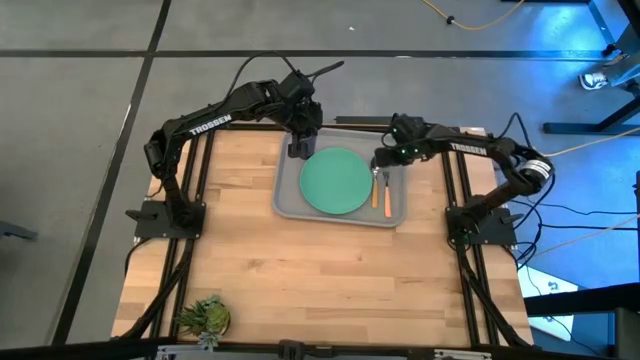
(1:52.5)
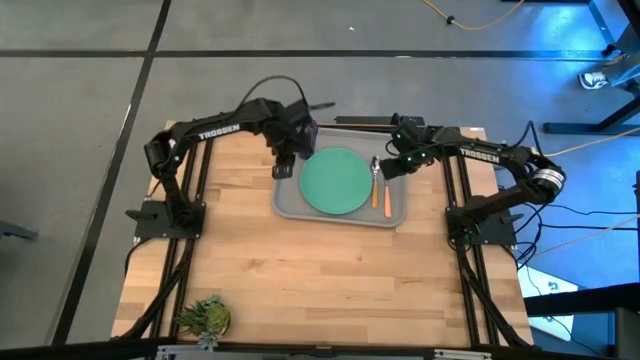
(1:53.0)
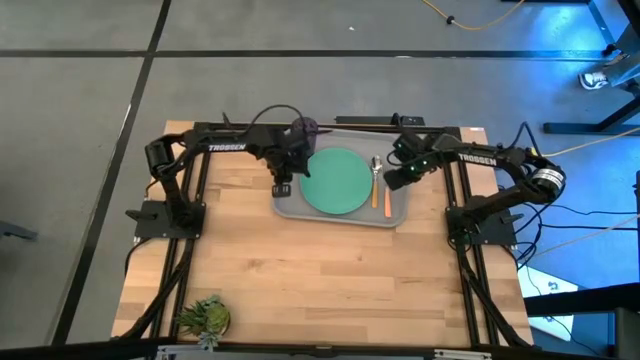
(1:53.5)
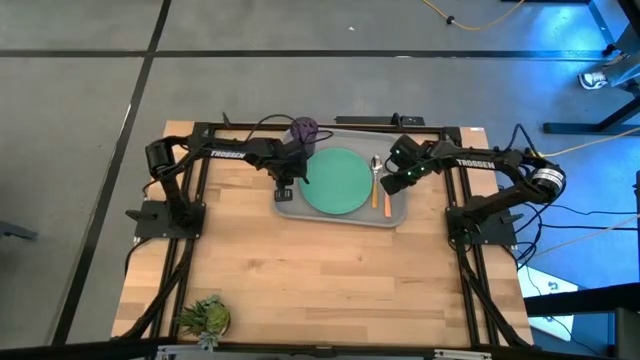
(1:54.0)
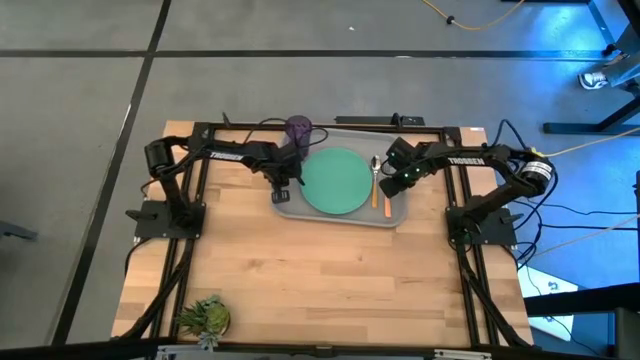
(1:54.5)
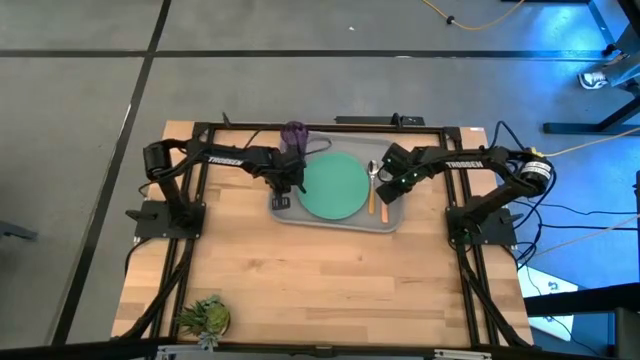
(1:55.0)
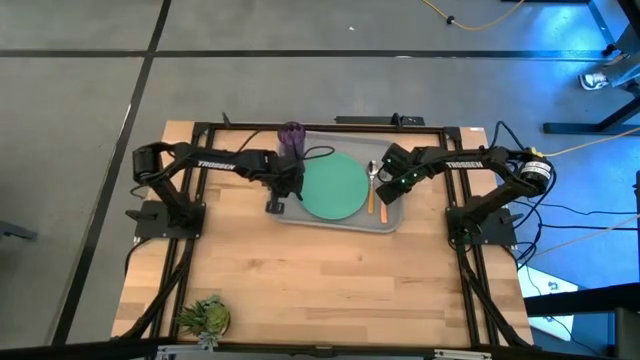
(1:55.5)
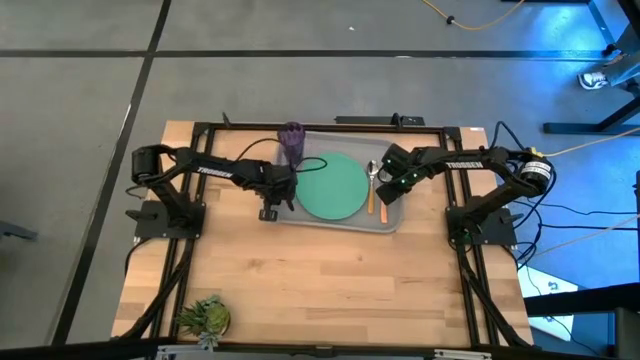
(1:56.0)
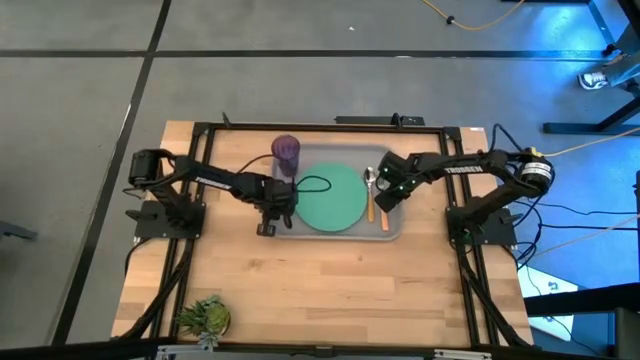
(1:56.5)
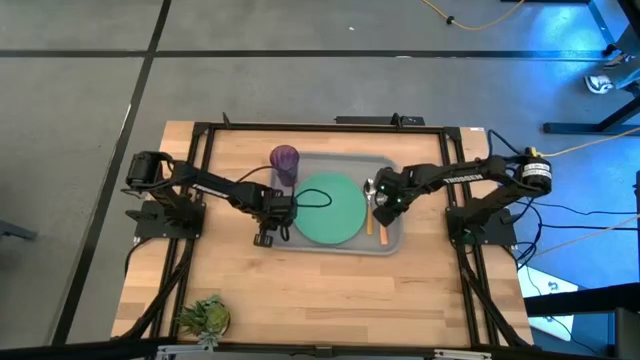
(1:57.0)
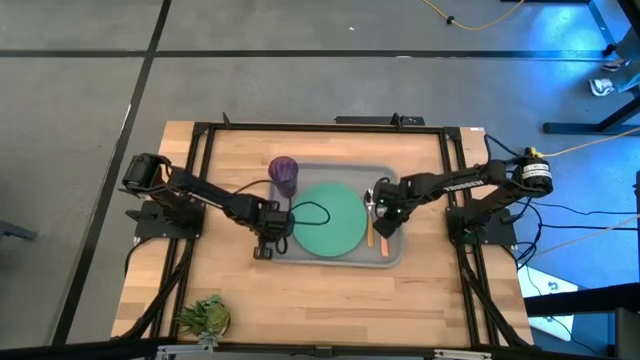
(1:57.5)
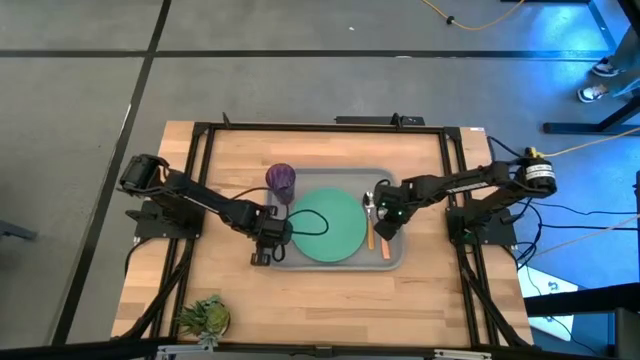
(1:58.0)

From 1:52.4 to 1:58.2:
Task: Pick and place plate/cup/fork/spoon on tray
Move the gray tray to the center of the table

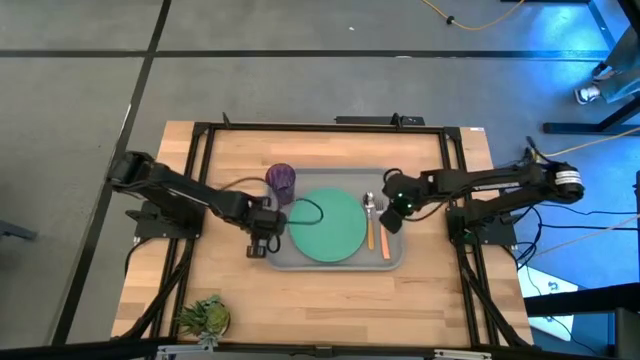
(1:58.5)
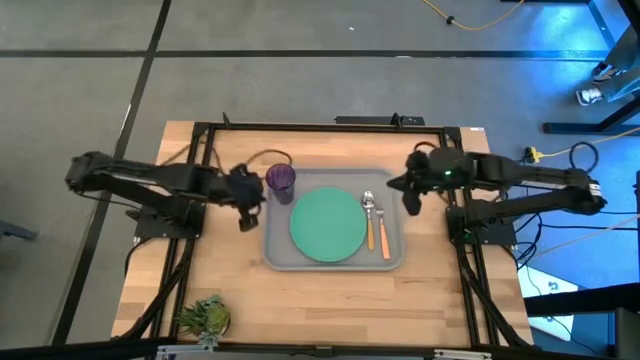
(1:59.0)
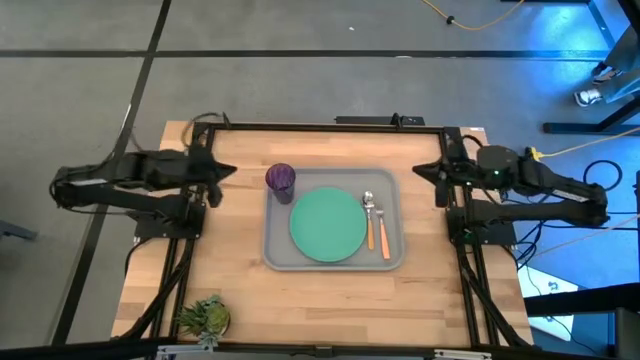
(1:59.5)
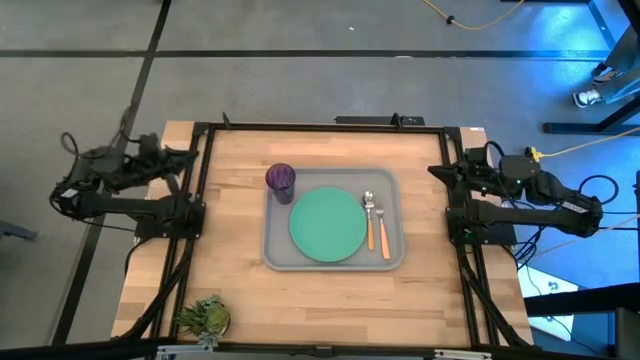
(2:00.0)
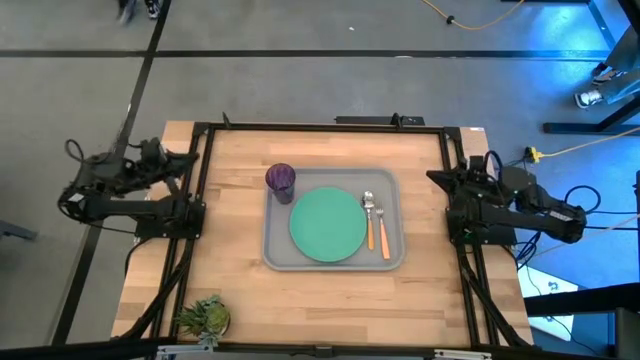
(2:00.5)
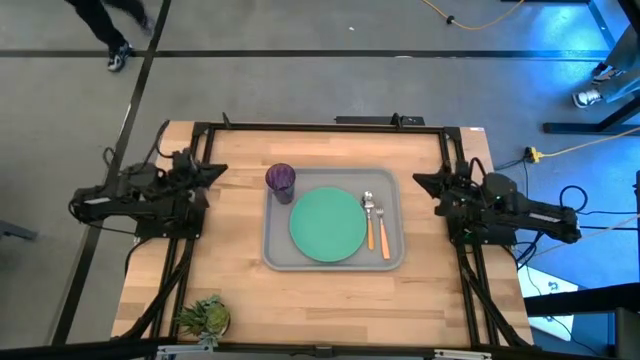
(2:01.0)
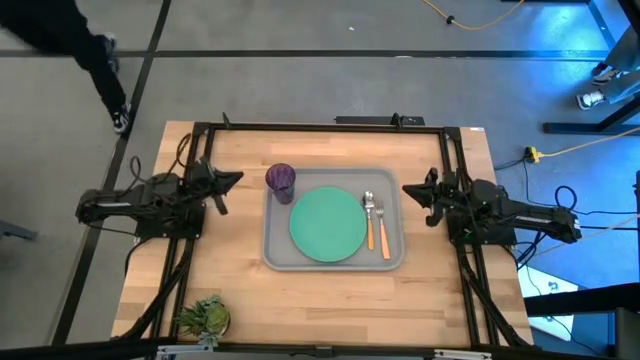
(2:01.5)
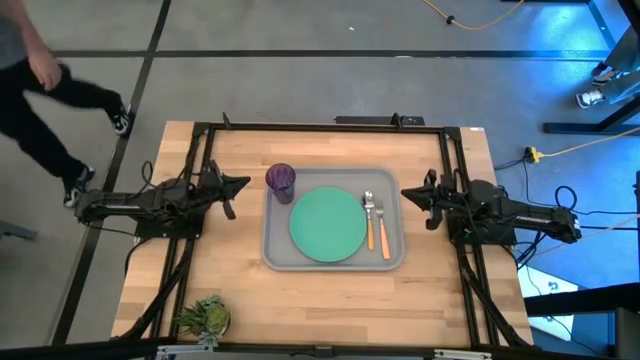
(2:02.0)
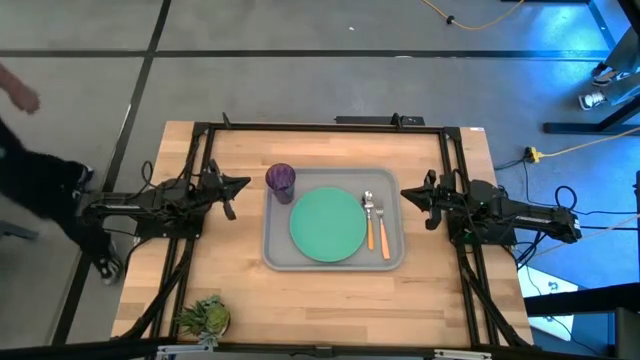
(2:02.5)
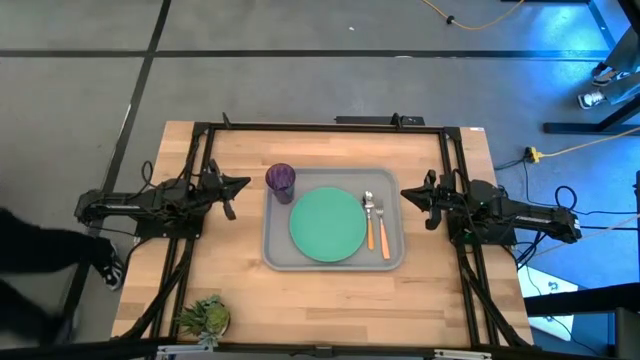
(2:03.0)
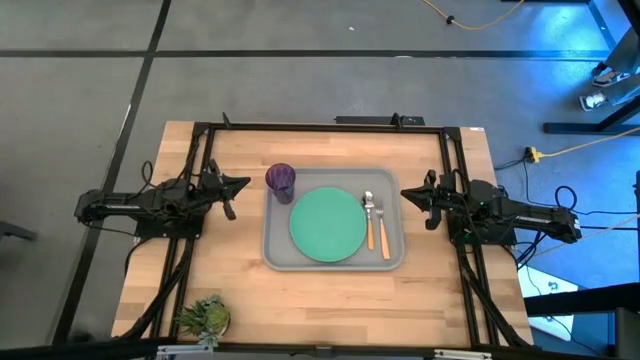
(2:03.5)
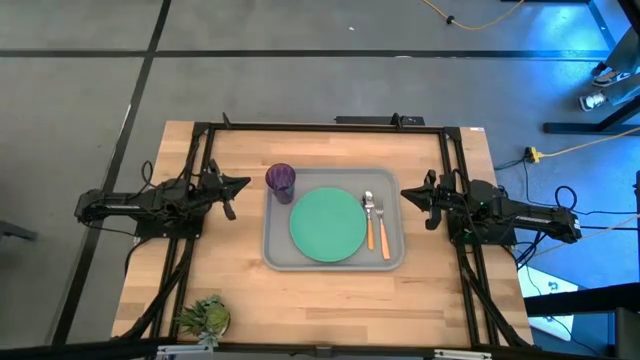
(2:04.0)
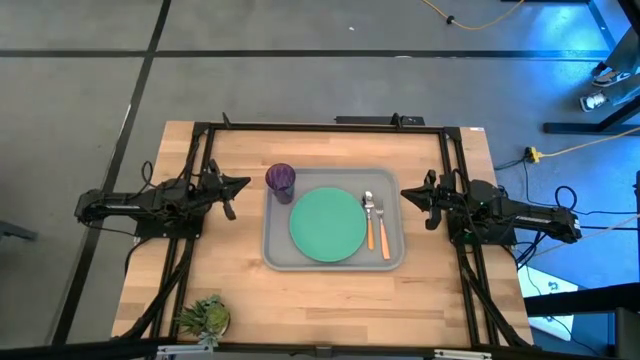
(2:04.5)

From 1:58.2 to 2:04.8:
Return to Home Position

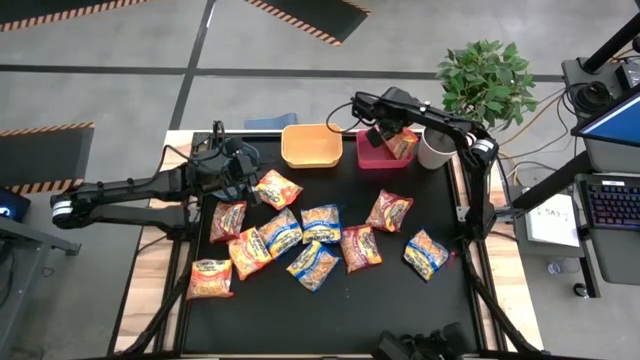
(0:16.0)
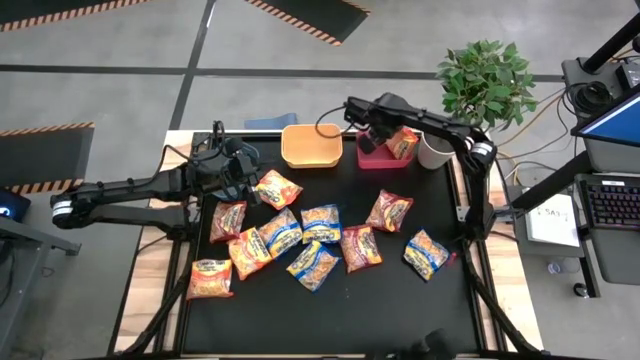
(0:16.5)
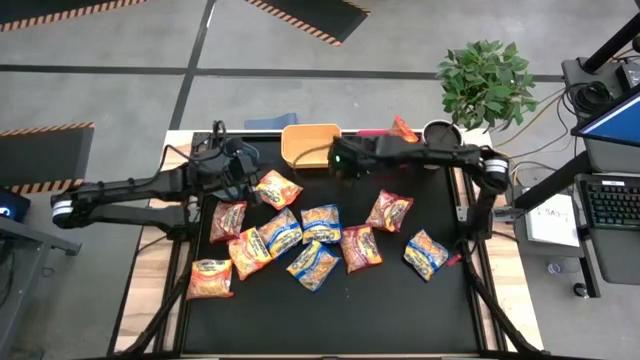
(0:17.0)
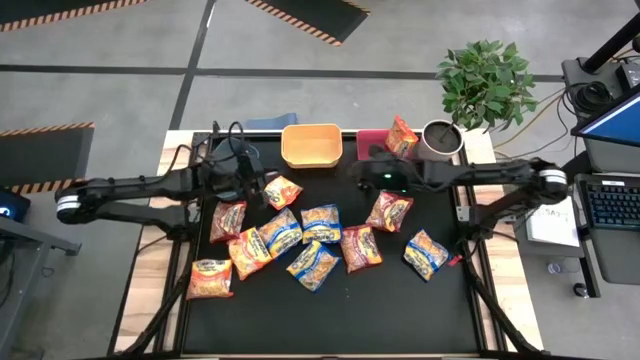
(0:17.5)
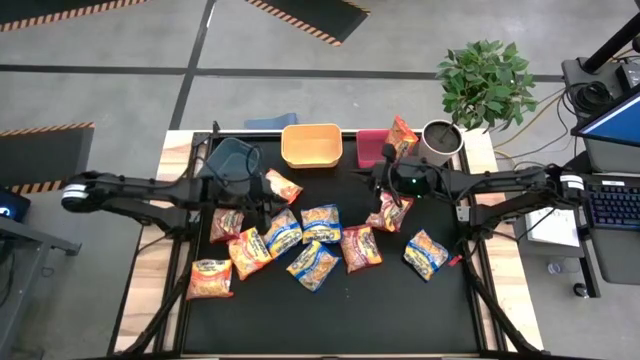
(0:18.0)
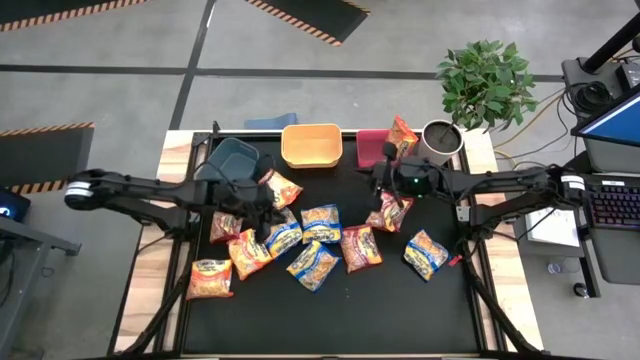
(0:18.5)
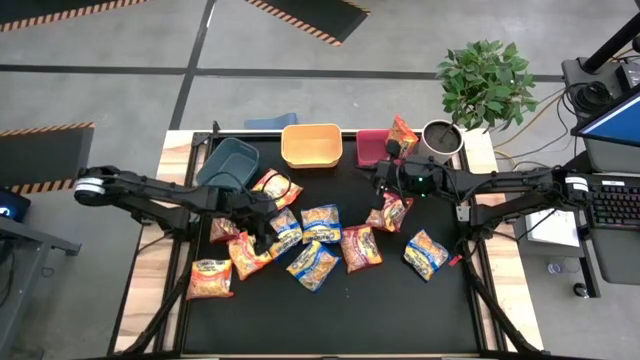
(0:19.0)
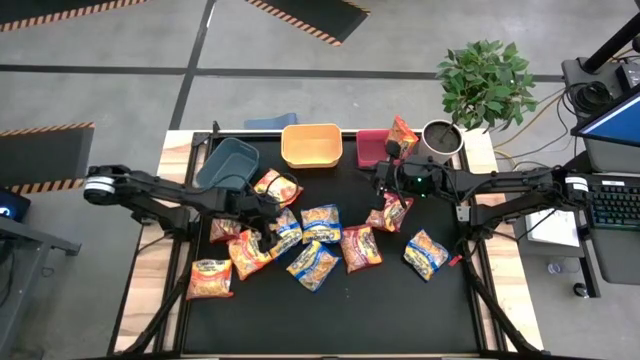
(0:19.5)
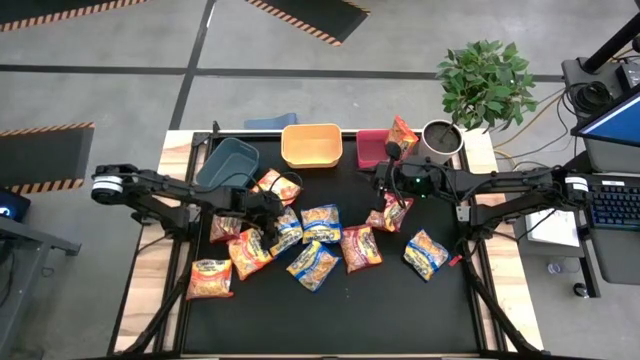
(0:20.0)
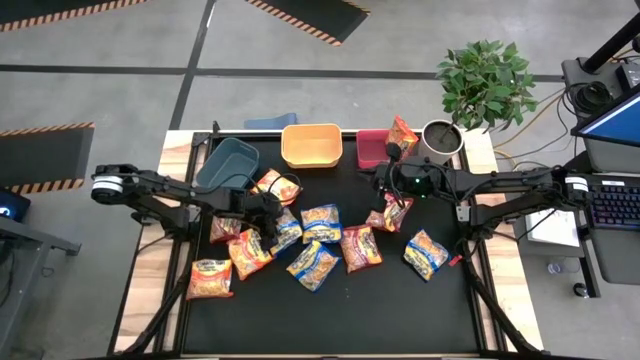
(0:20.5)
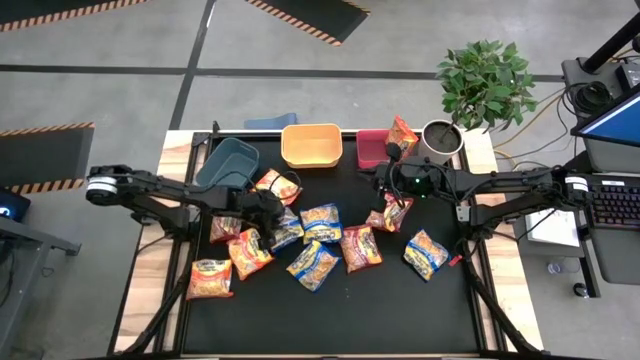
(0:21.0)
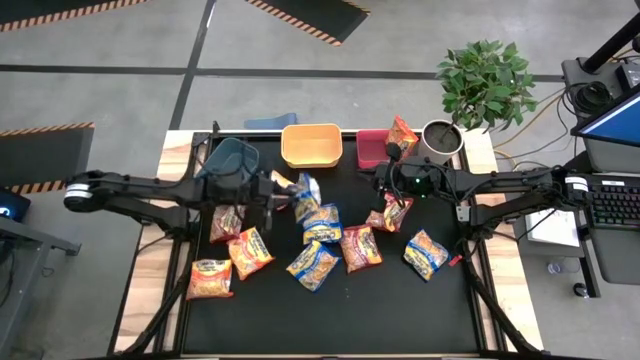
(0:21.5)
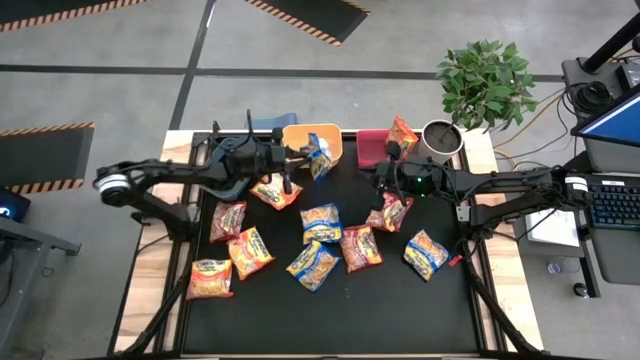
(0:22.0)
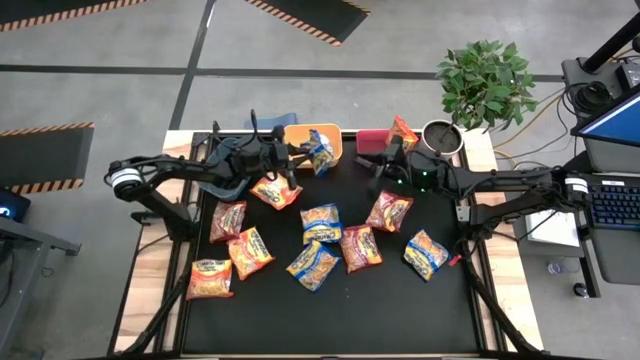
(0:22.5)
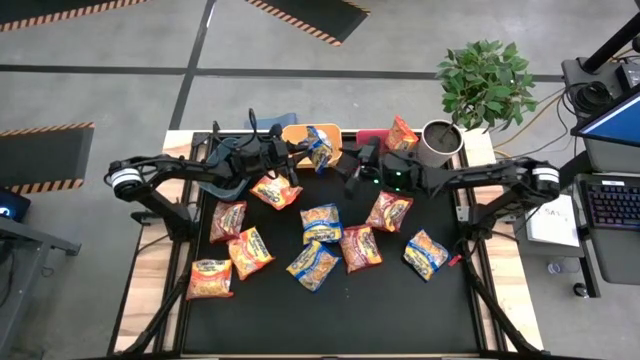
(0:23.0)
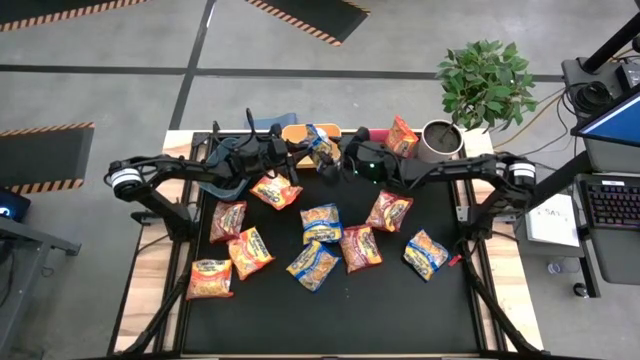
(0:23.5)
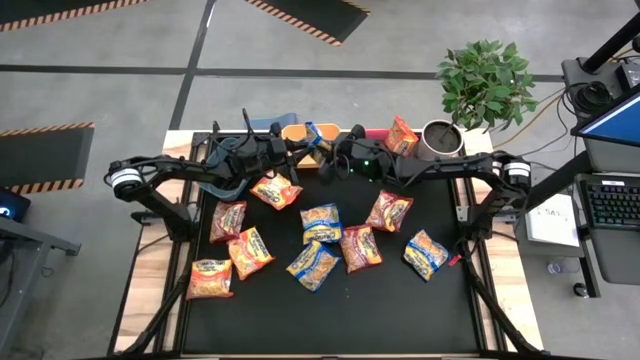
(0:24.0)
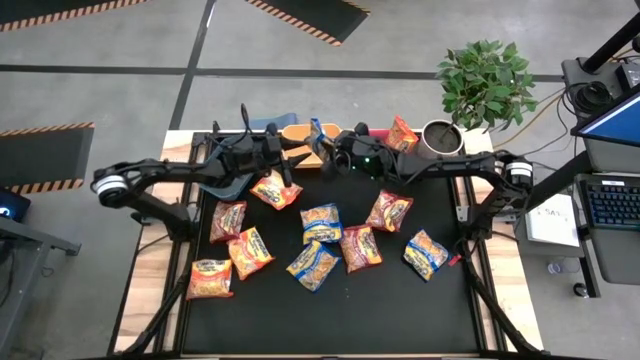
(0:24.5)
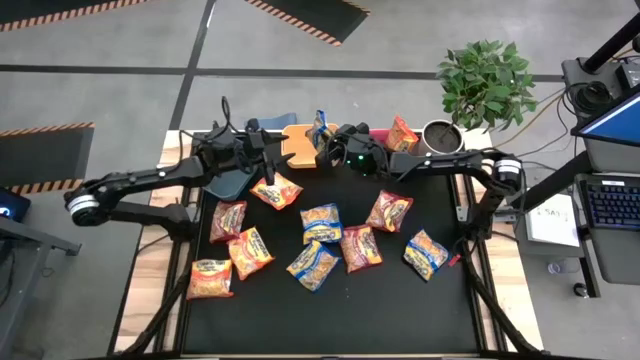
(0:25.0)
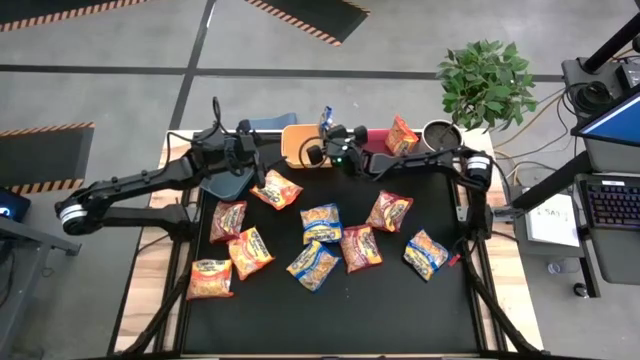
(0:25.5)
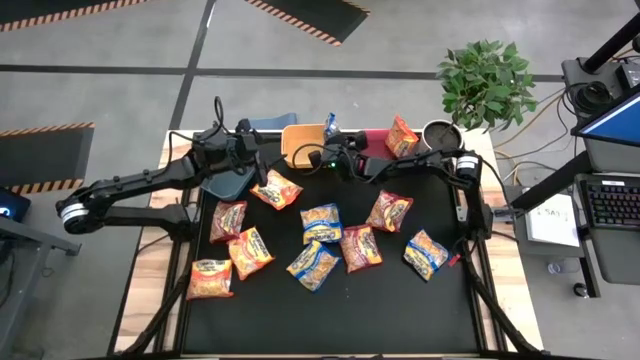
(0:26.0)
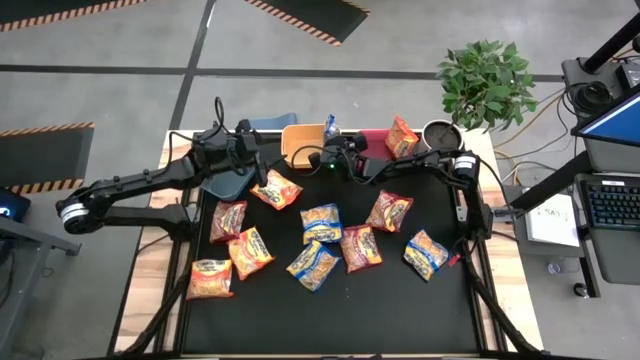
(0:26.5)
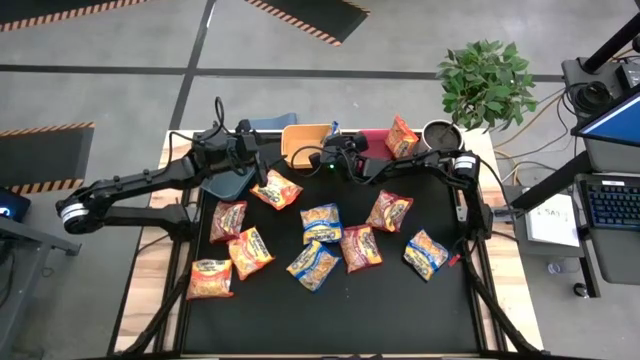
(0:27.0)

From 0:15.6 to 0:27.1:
Task: Sort Maruchan noodles
Put the blue noodle pack into the yellow bin
